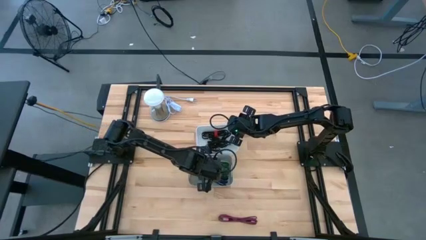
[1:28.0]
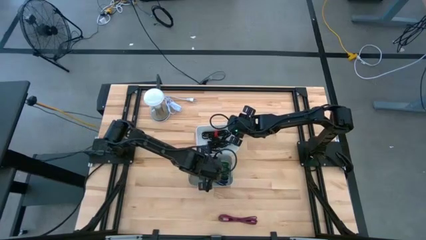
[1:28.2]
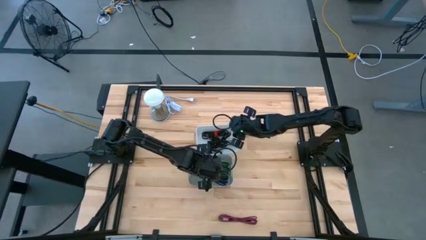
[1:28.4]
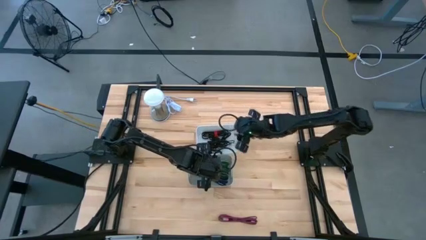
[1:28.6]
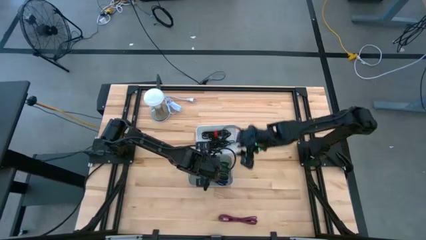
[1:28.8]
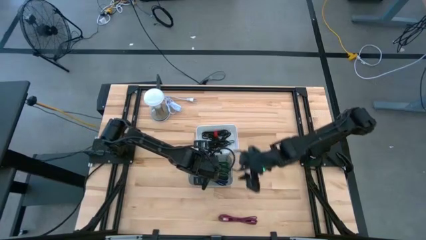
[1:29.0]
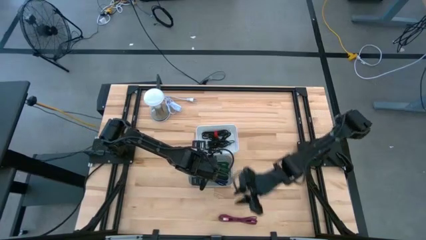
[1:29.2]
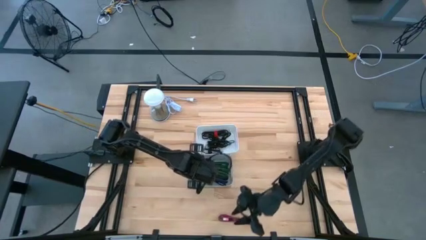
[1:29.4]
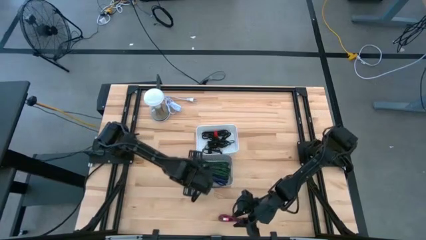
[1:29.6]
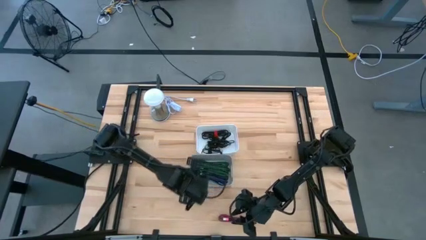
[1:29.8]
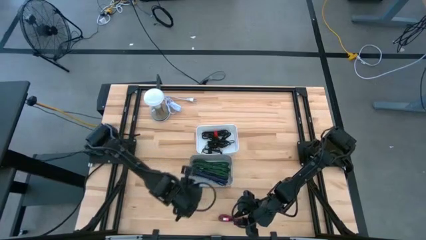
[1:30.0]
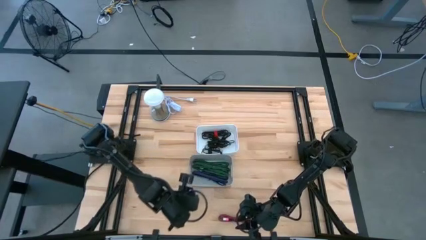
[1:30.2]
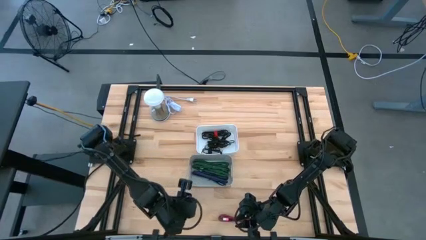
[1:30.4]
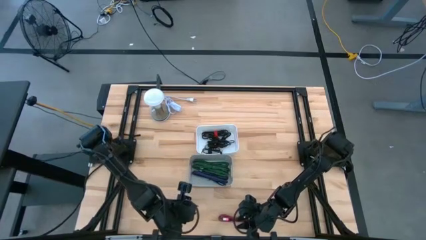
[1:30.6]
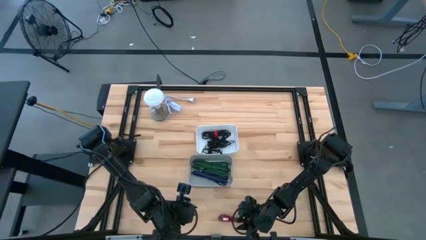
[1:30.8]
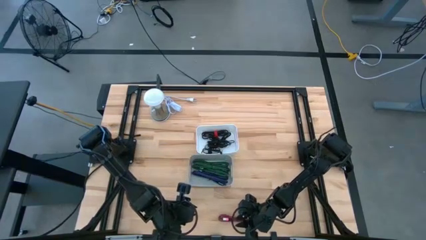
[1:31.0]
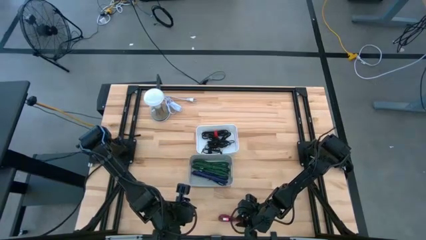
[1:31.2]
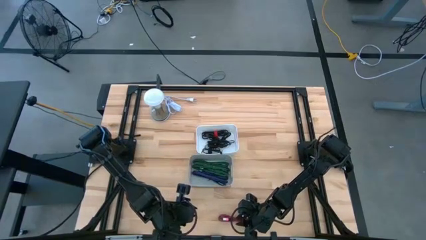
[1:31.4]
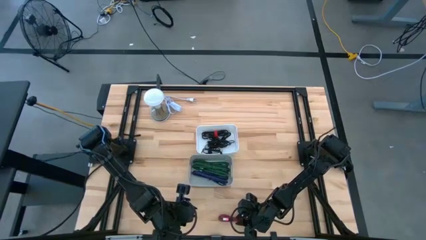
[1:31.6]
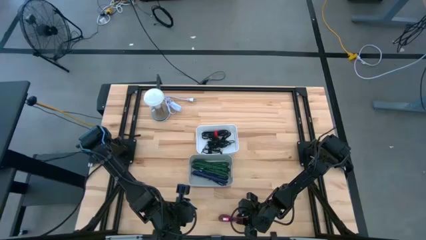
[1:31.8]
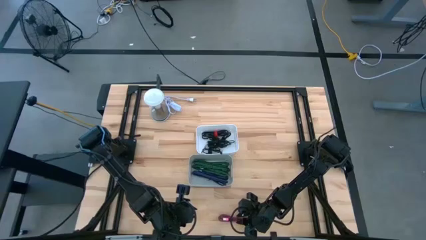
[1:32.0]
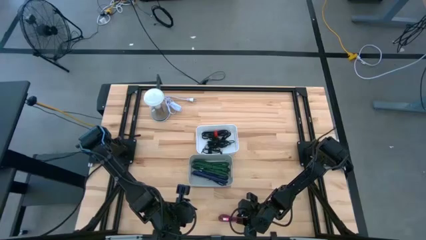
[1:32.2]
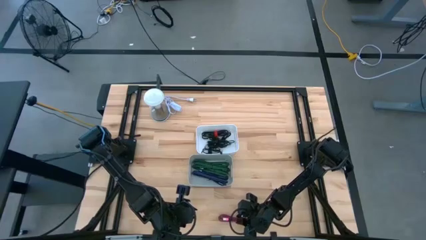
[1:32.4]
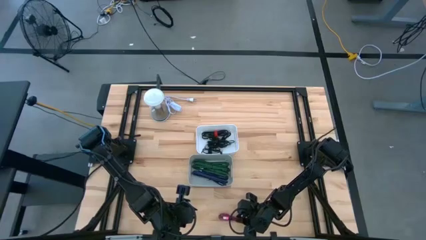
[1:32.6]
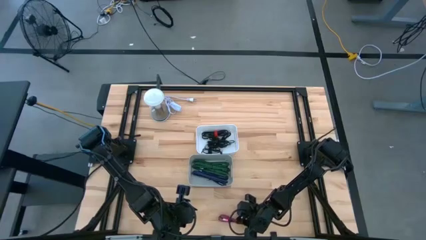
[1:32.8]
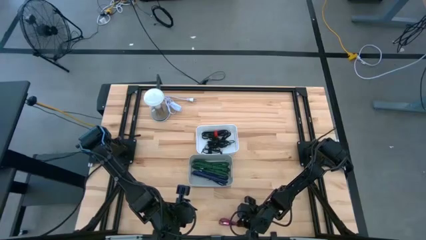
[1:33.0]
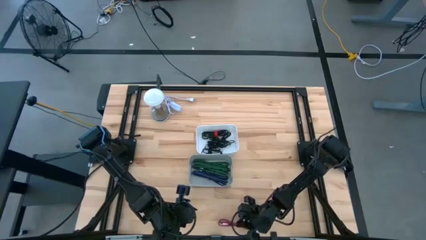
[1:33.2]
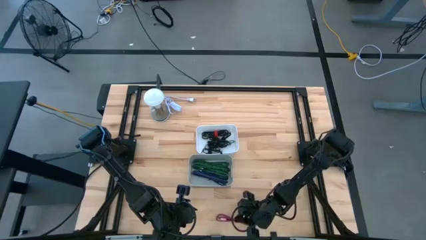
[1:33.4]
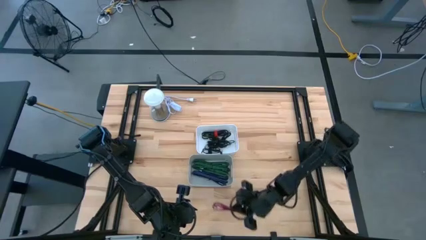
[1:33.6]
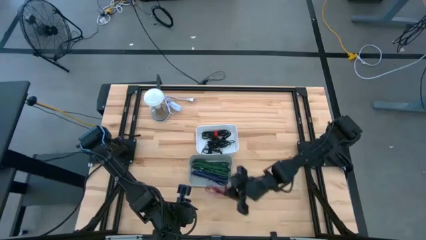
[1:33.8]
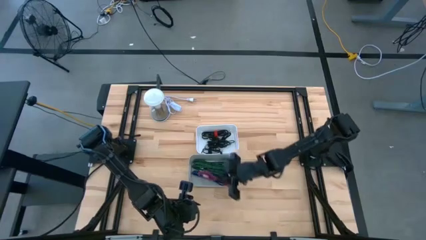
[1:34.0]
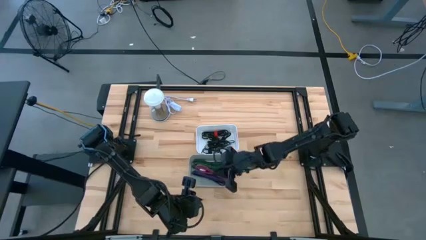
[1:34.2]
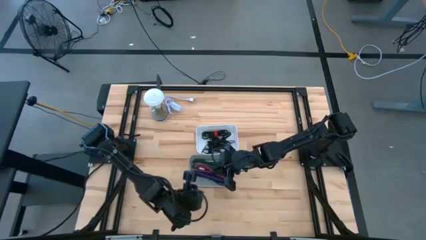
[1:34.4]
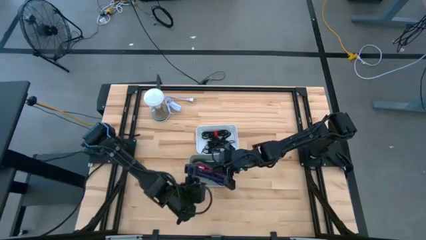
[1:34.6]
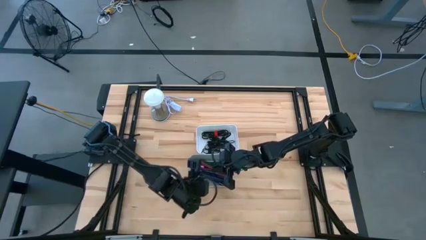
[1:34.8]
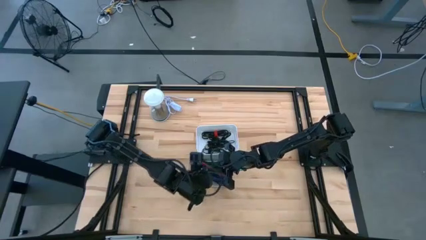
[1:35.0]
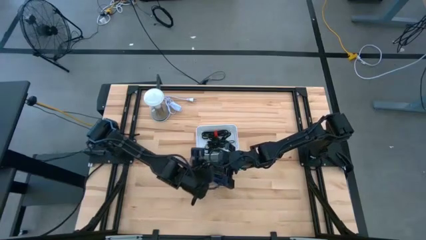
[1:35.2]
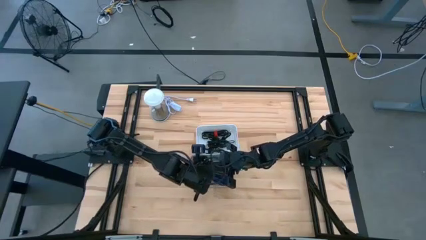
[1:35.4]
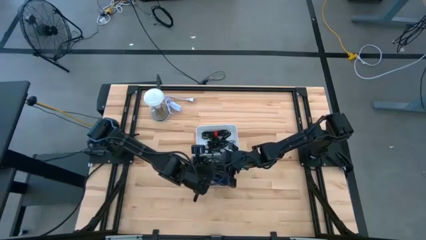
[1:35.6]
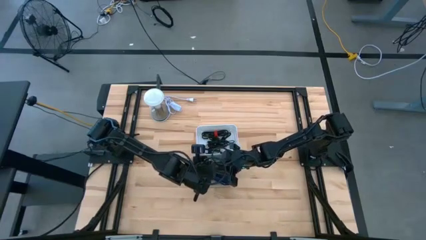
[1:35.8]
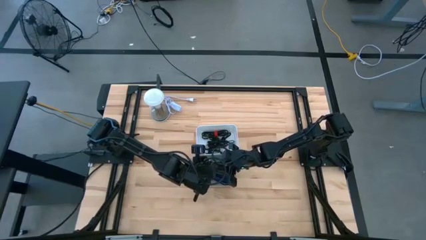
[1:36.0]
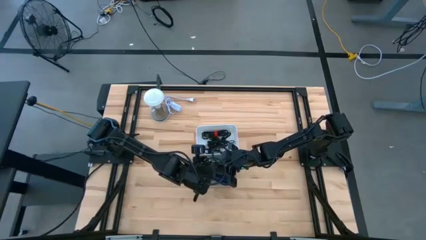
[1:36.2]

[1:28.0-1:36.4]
Task: Pick & Place USB Port
Put the pink charger cable into the gray container

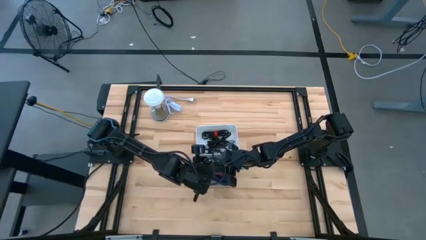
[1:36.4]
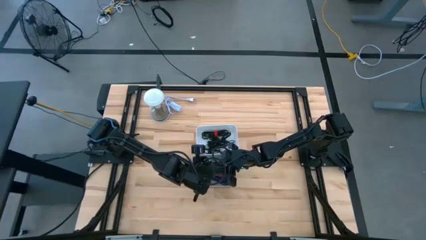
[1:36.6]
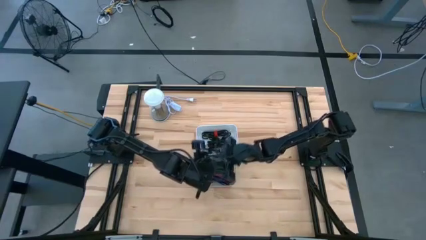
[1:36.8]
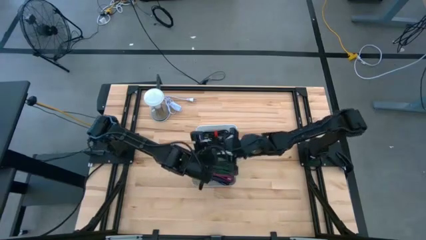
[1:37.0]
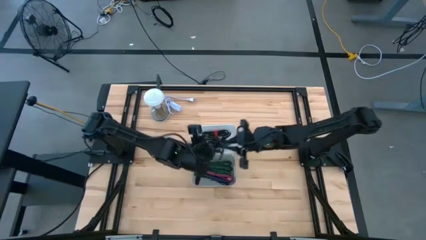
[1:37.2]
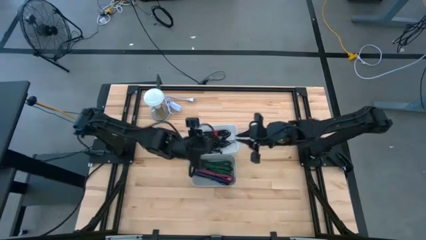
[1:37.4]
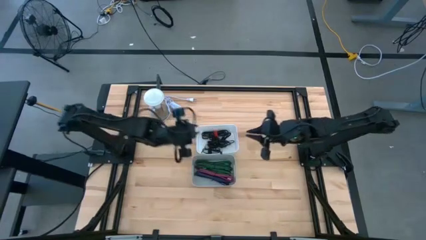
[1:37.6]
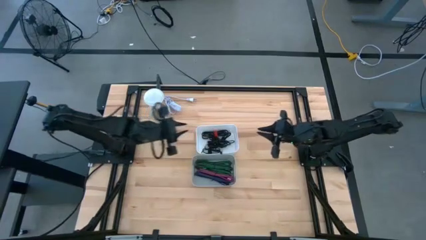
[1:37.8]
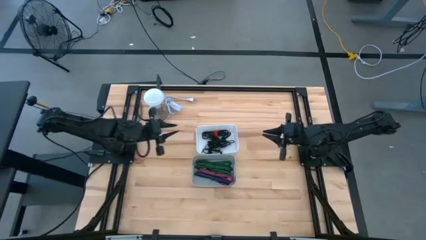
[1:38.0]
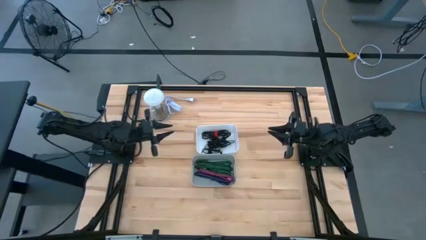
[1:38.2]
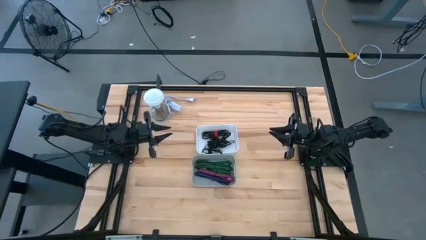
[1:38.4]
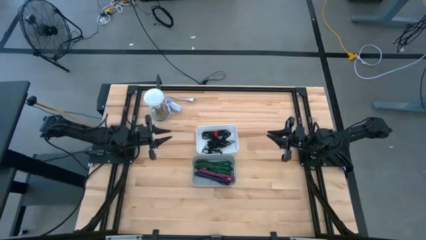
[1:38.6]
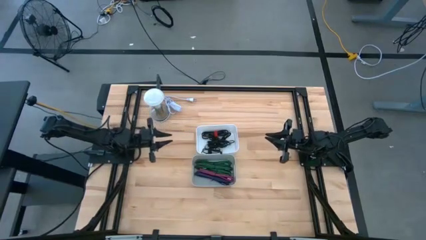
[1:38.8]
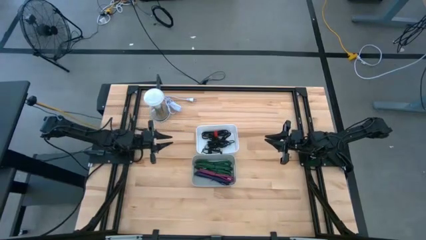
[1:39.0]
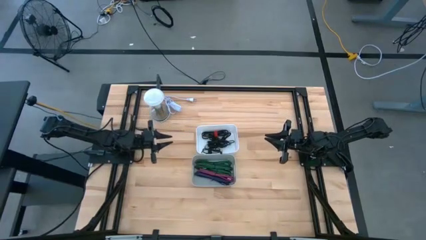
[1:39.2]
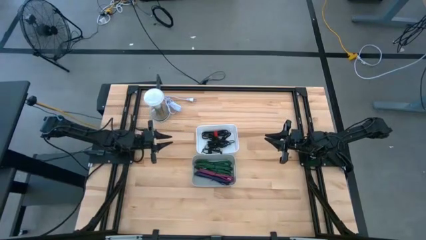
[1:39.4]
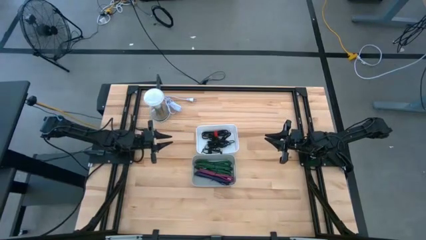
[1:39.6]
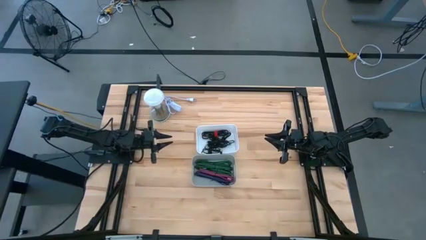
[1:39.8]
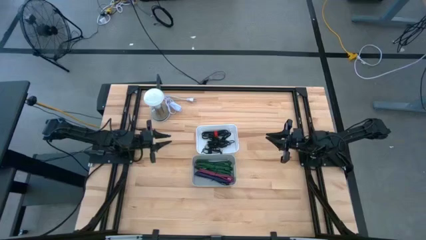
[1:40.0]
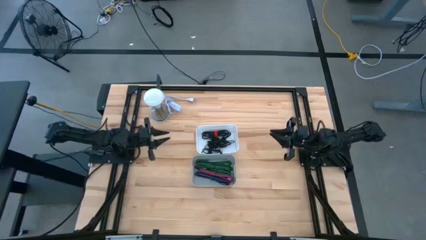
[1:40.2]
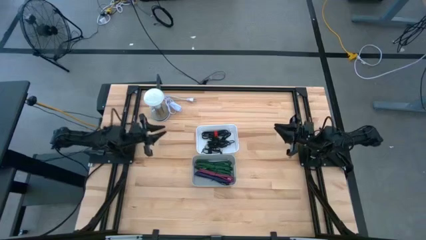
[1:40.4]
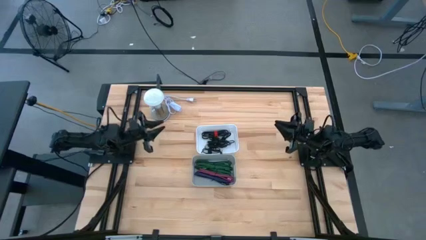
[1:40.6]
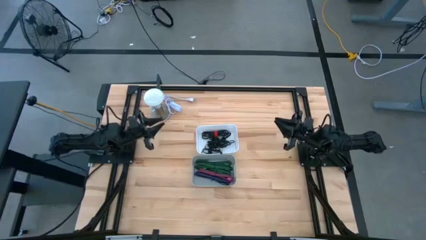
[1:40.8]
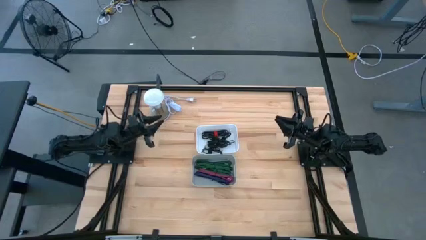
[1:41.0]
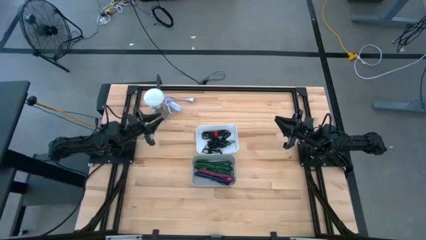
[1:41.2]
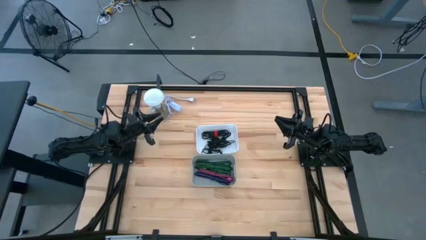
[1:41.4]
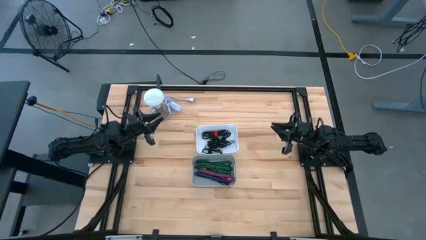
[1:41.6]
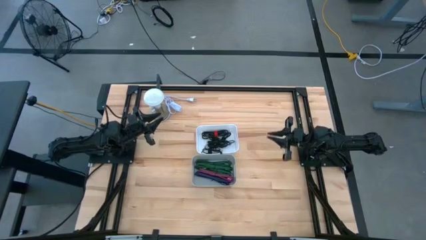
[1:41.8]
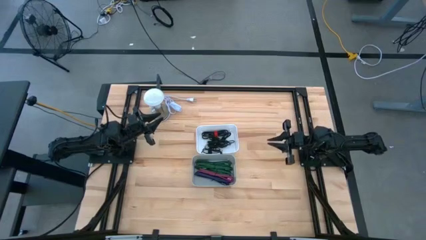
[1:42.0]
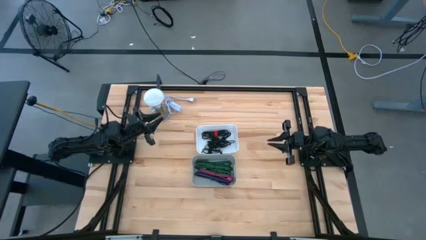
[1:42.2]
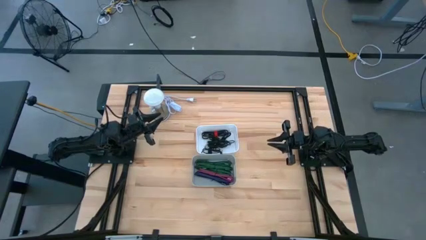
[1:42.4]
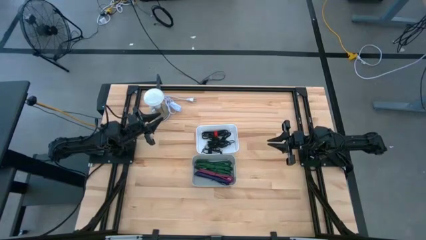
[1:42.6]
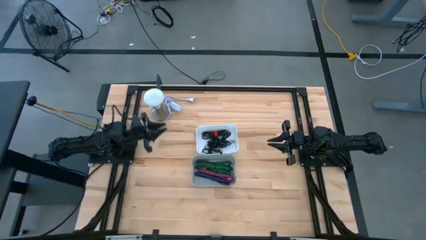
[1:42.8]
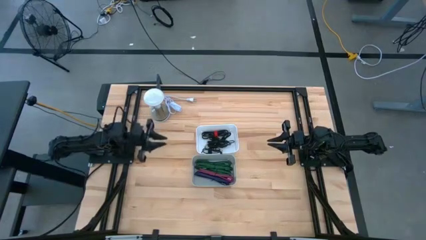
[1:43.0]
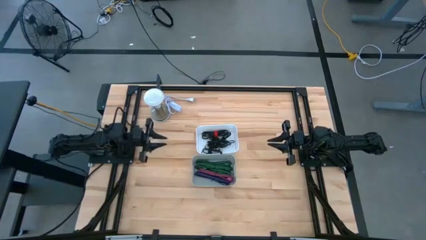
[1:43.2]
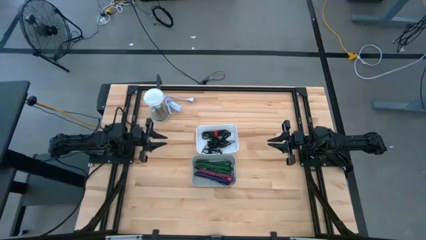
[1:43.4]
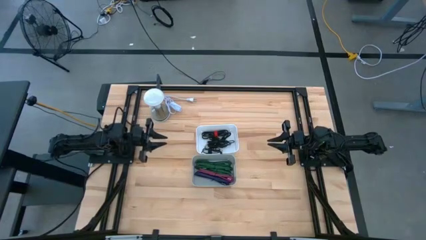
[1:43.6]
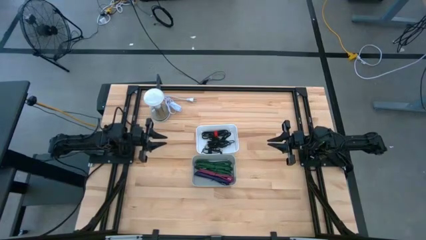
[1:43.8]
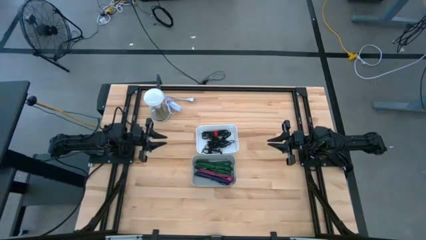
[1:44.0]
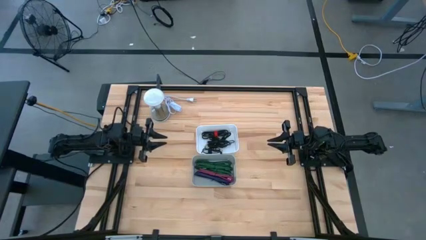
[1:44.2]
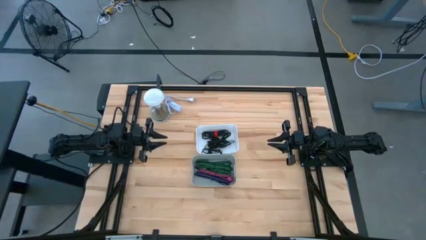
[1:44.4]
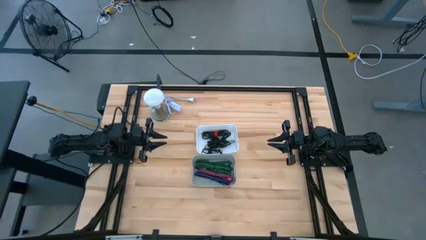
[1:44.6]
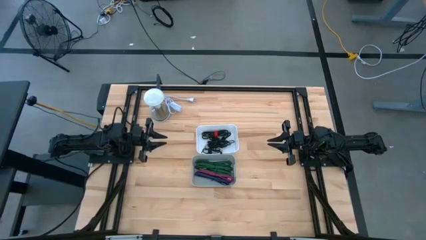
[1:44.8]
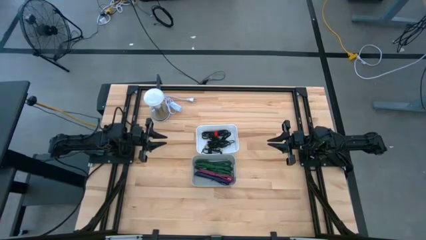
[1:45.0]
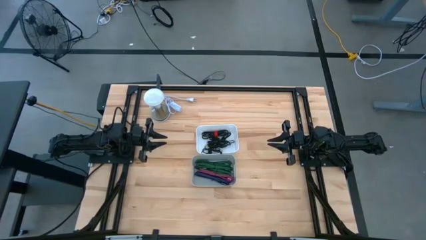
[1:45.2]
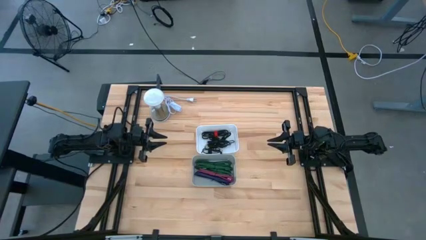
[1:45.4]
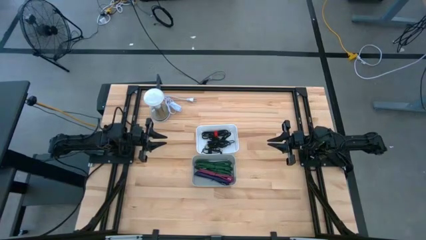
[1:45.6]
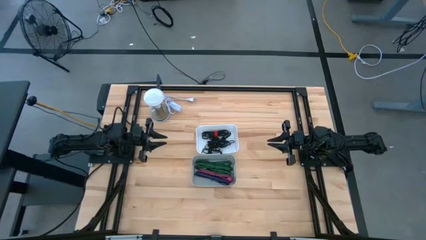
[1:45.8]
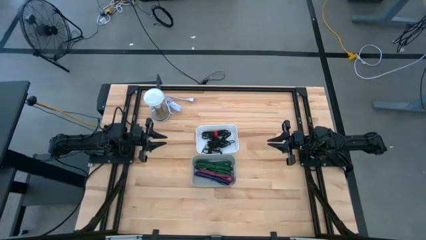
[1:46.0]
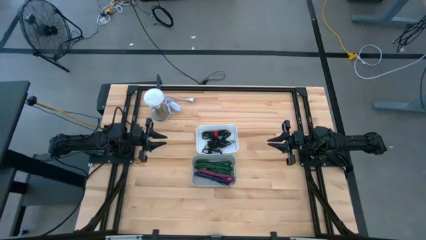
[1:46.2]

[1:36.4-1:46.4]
Return to Home Position
